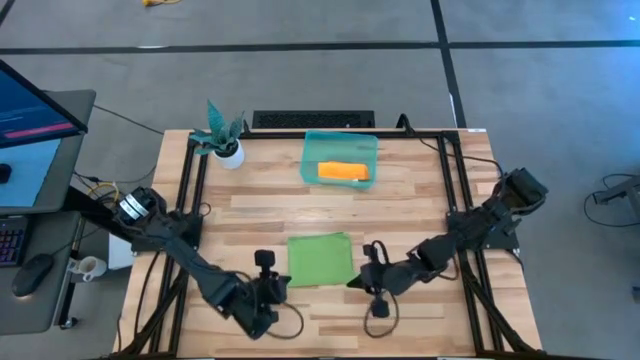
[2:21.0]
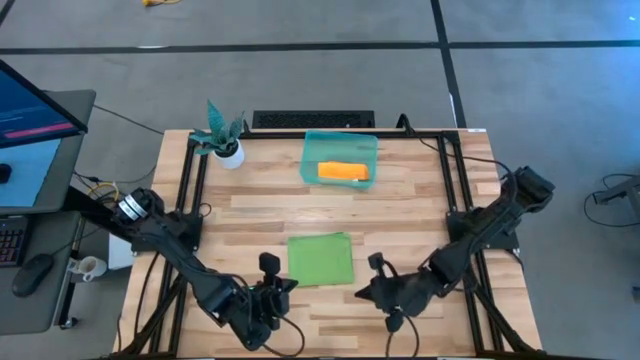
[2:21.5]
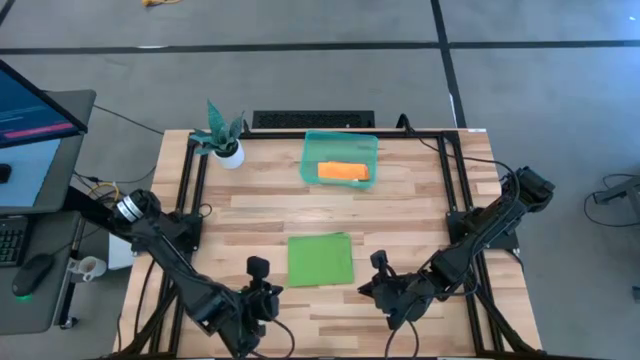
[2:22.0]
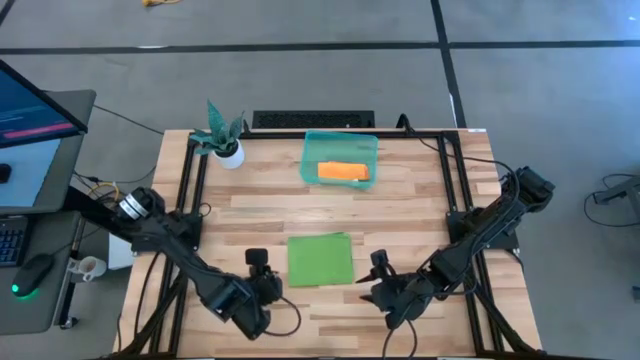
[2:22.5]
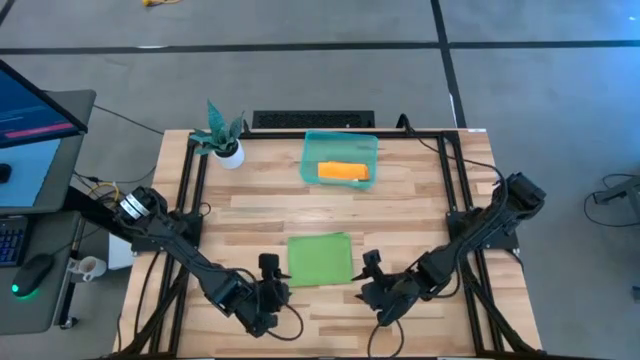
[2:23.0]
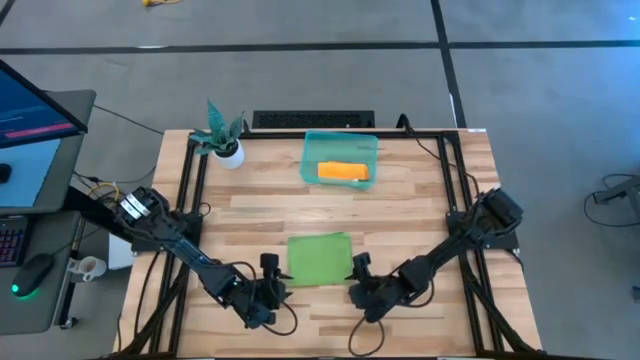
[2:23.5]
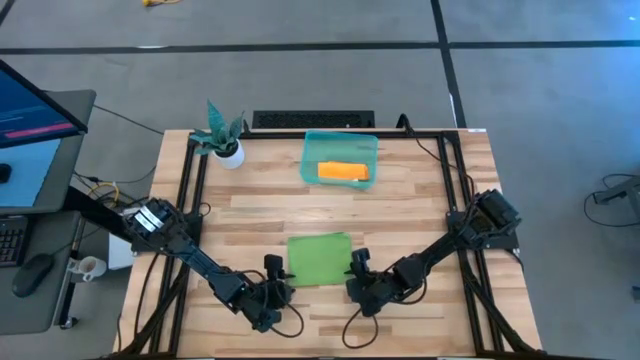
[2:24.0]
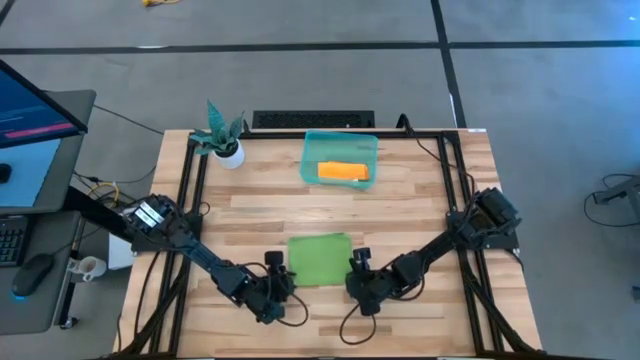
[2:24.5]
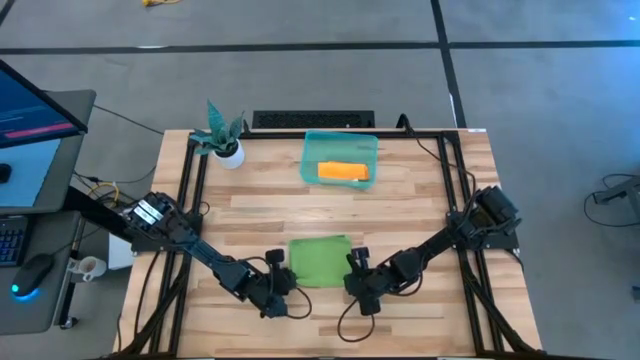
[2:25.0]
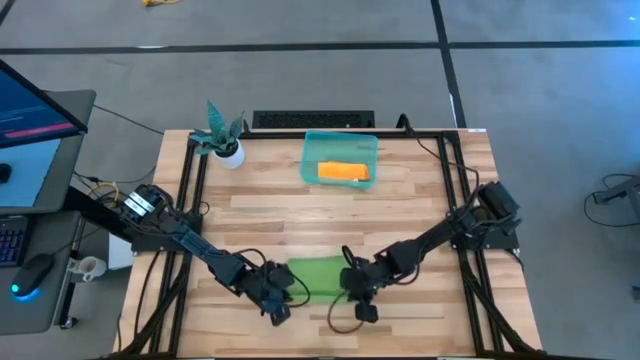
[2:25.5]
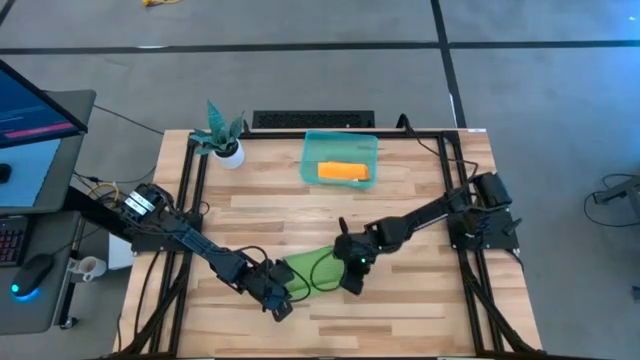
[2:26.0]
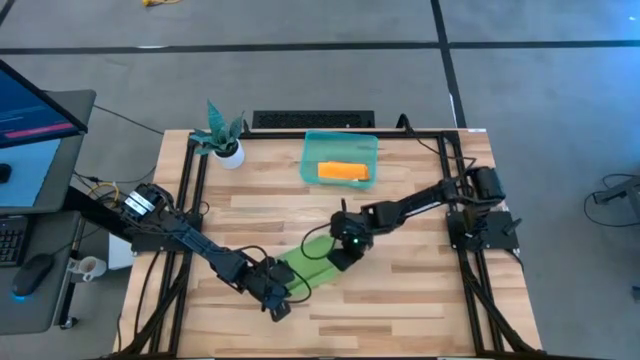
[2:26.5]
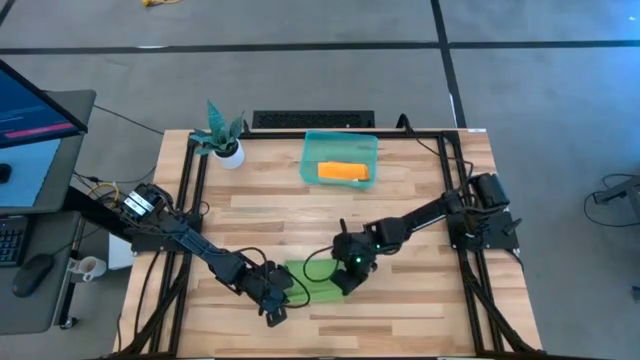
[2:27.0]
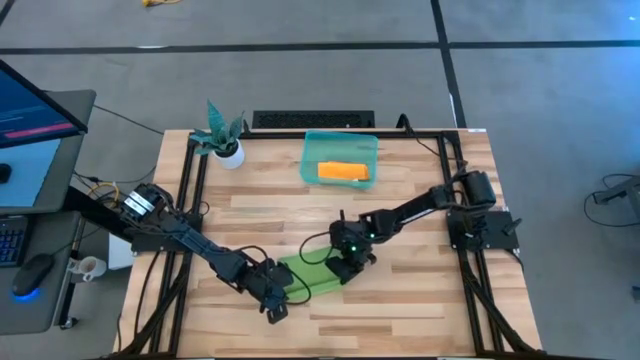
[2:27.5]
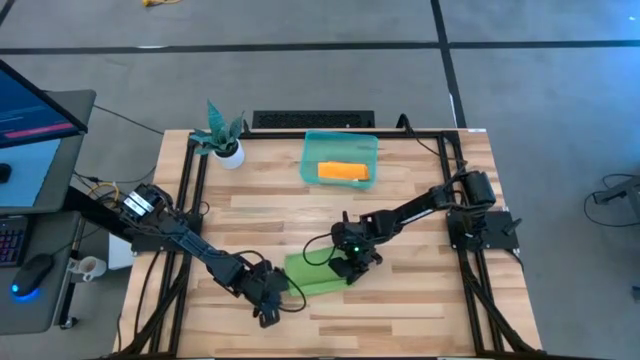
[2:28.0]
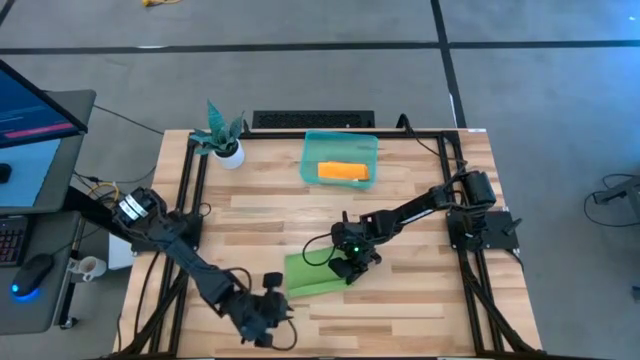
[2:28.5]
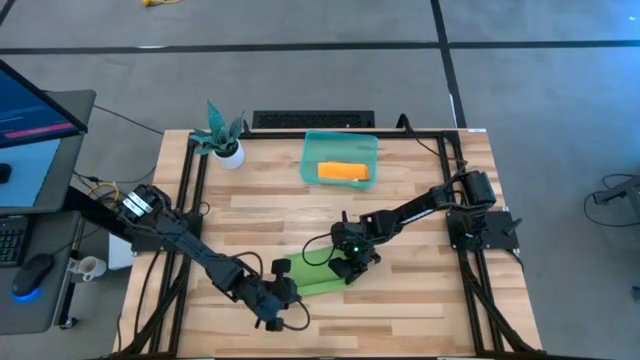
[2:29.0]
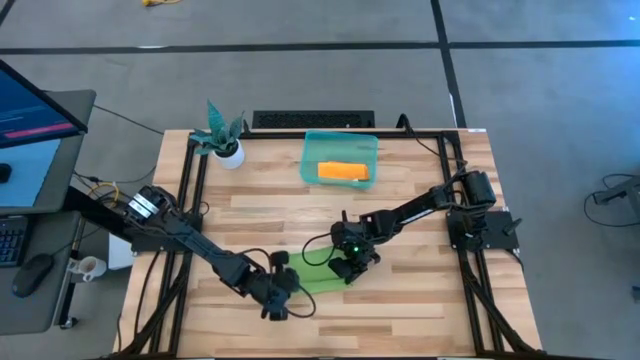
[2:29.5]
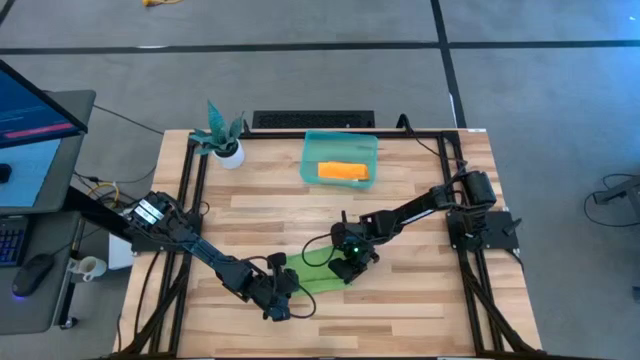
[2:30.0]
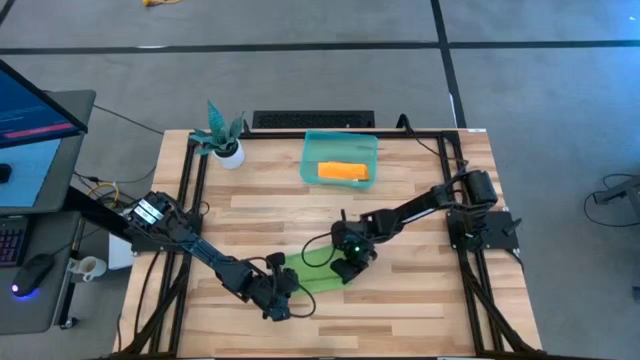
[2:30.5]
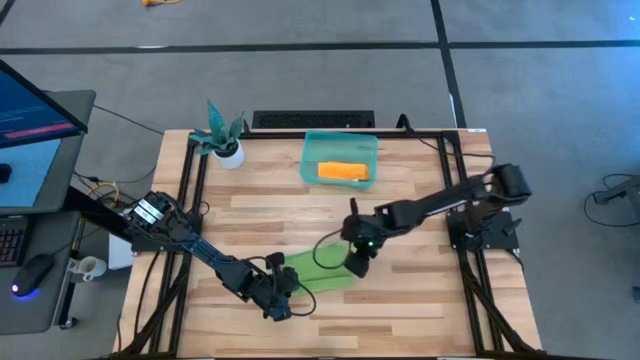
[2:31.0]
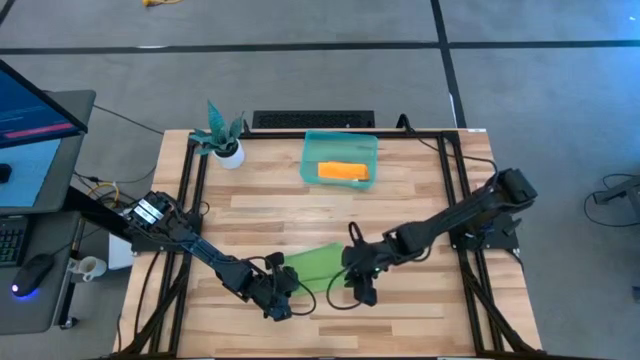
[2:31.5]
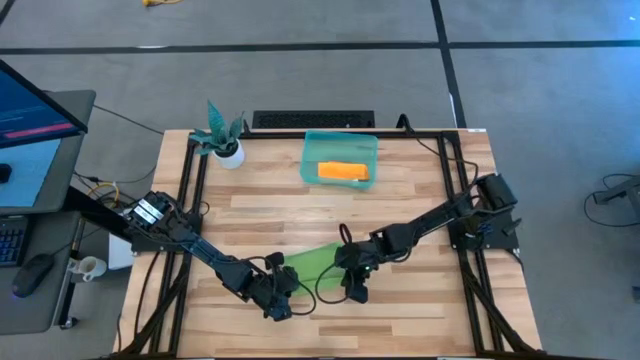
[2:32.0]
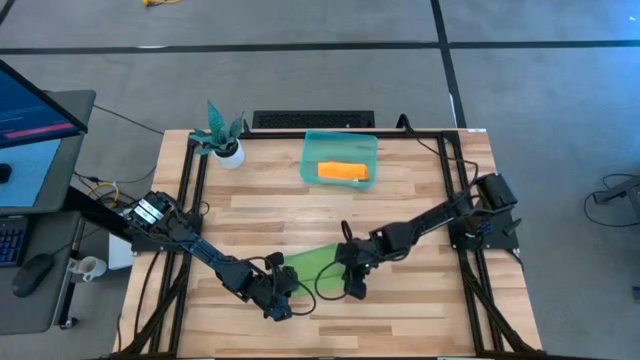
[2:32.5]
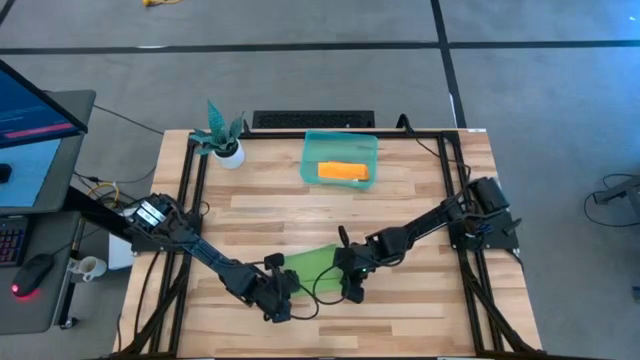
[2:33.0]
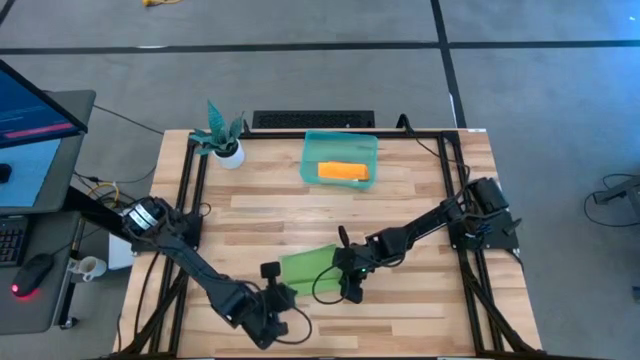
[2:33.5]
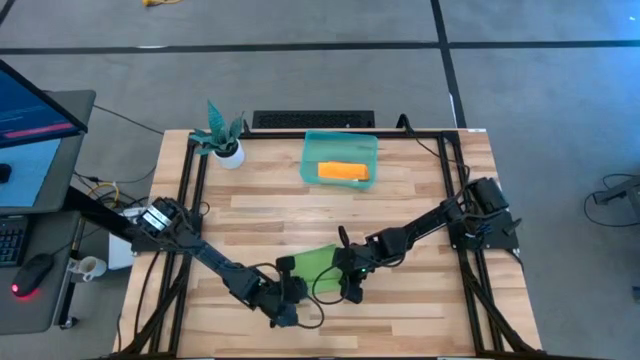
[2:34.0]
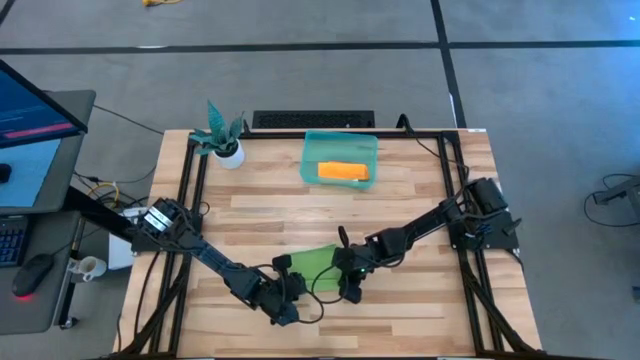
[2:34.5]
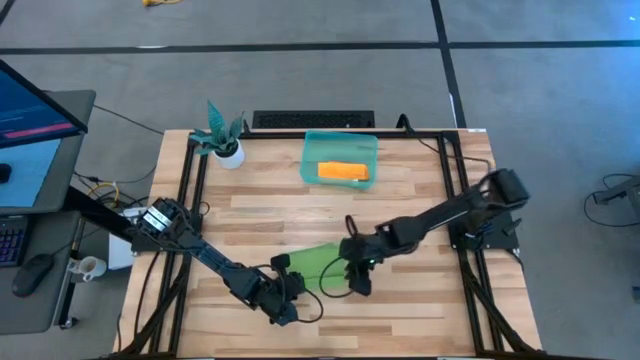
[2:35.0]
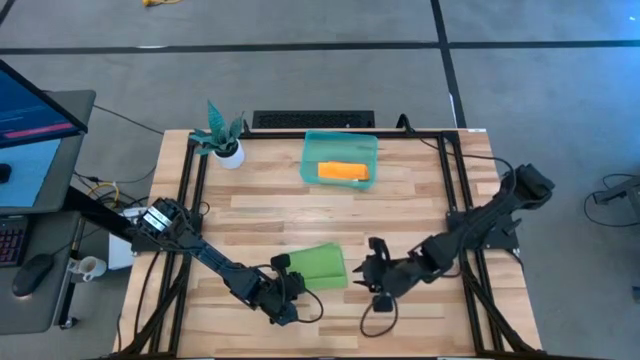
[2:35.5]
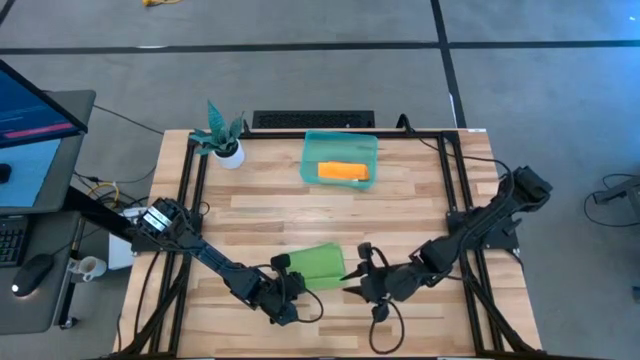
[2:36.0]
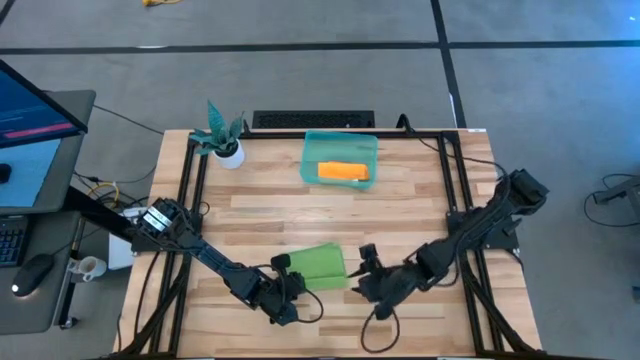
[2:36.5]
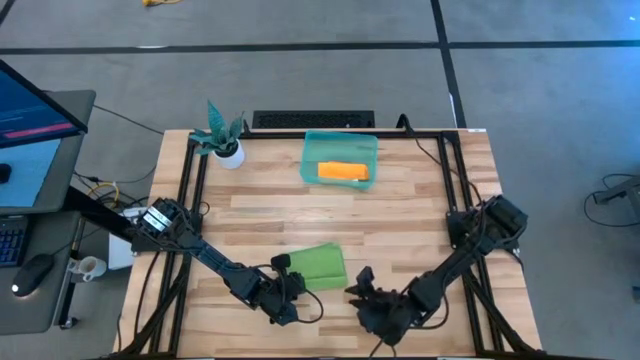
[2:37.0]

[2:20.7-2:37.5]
Task: Roll microfiber towels into tight, uniform cylinder then place into a basket
Roll the green towel

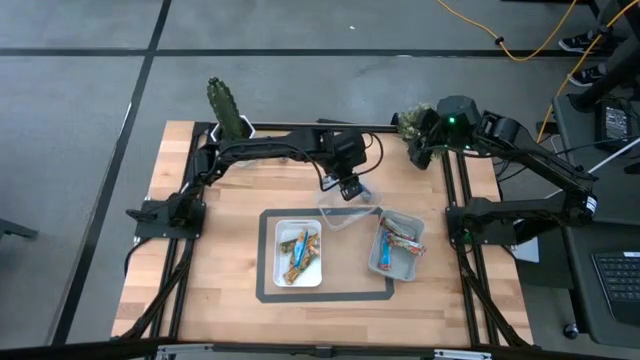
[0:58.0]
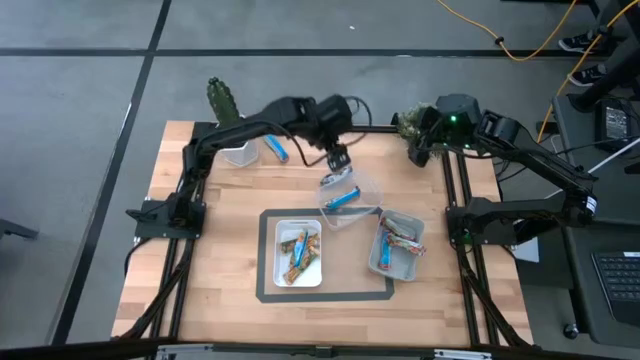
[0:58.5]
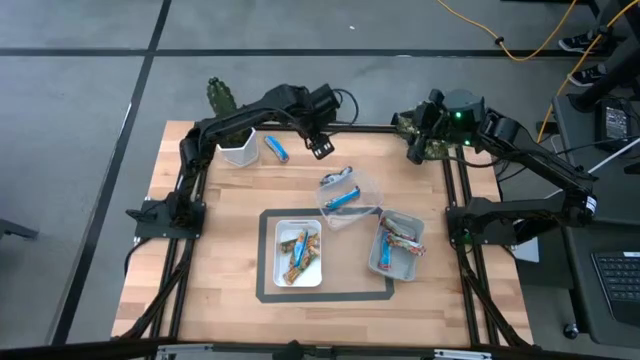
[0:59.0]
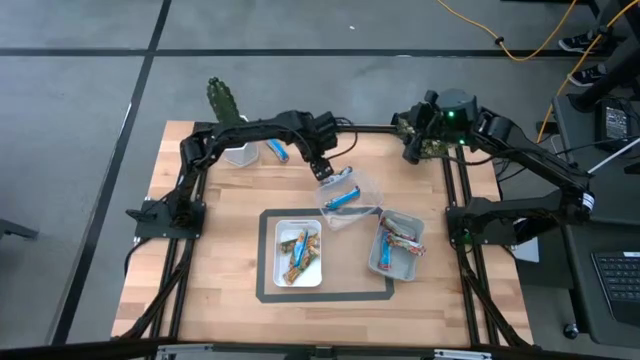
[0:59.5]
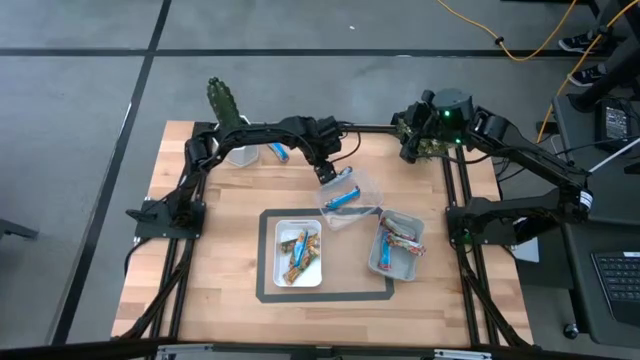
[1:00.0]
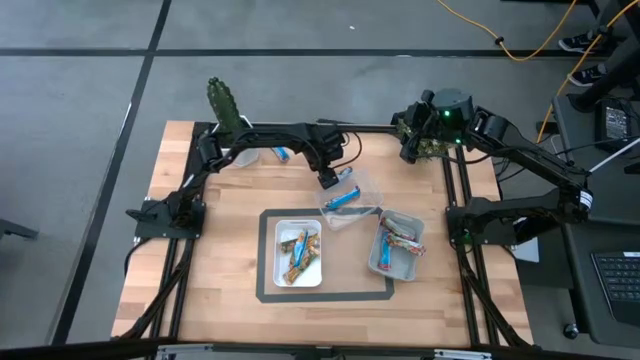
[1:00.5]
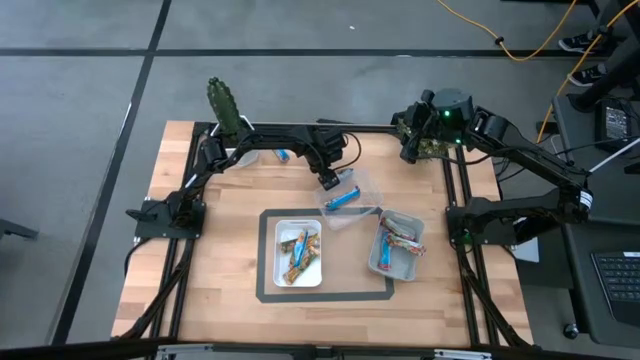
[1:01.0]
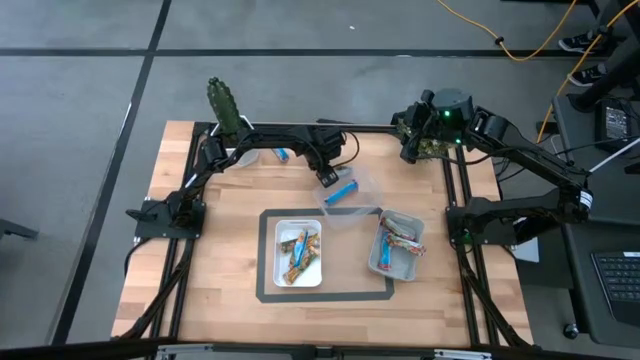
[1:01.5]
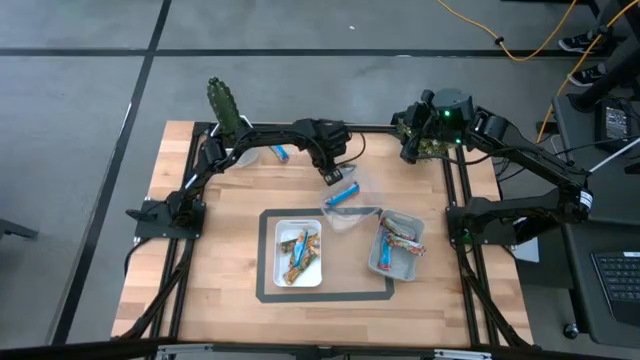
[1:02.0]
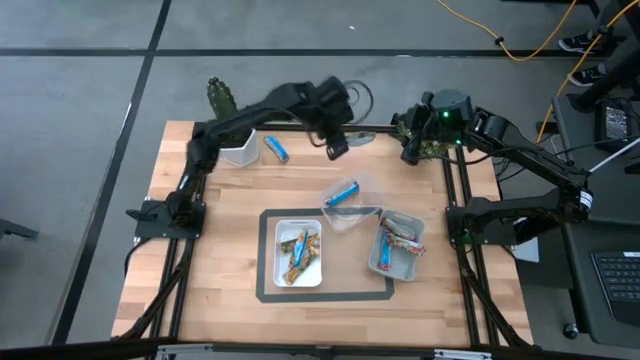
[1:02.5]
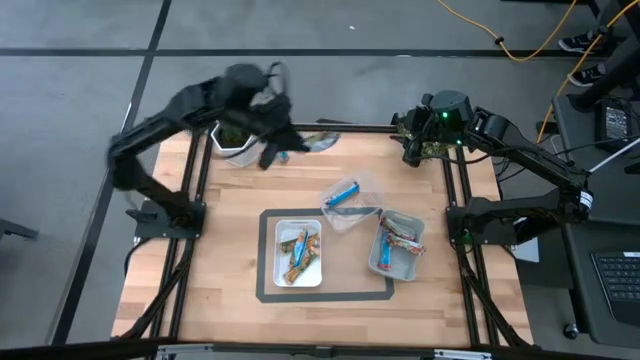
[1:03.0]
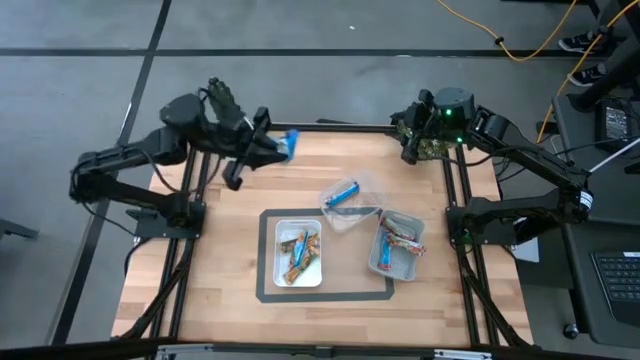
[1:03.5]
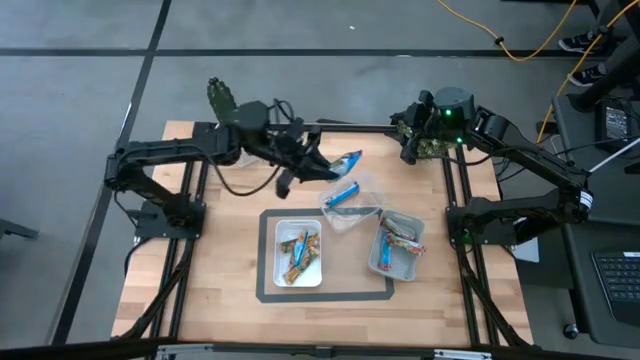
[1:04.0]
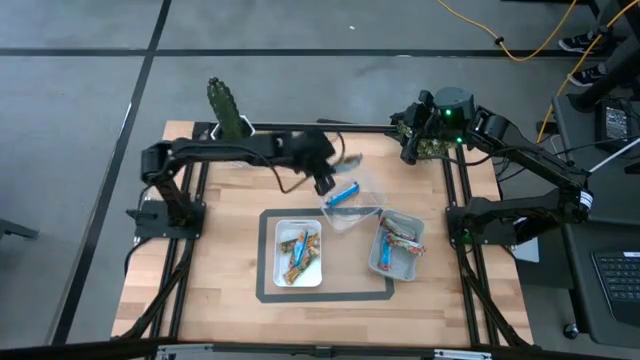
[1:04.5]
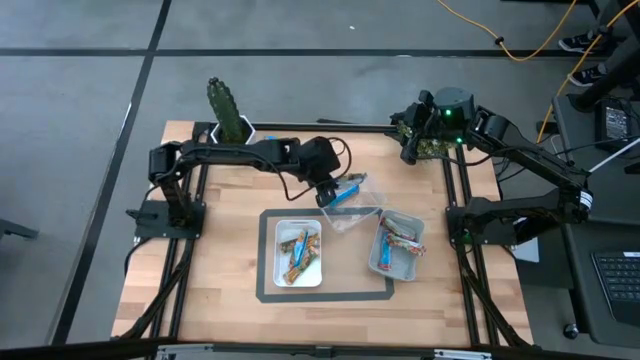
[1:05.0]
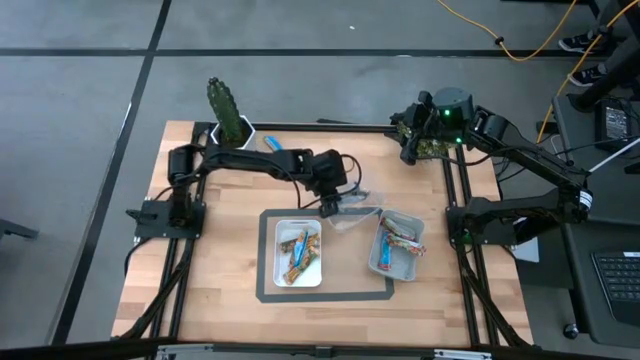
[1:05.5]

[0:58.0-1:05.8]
Task: Pick and place Granola Bars by type
Put the blue granola bar into the transparent bin
